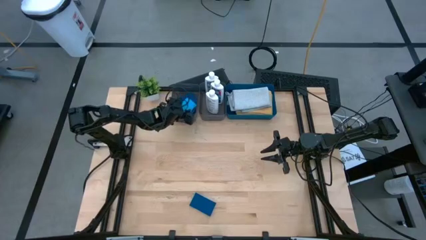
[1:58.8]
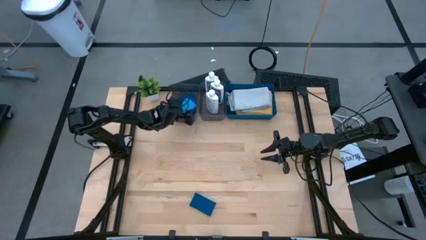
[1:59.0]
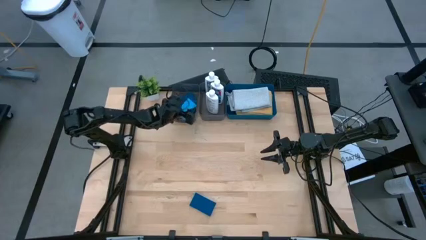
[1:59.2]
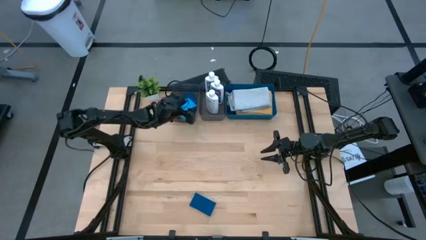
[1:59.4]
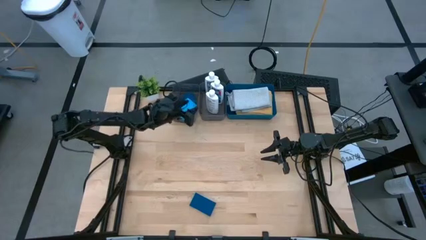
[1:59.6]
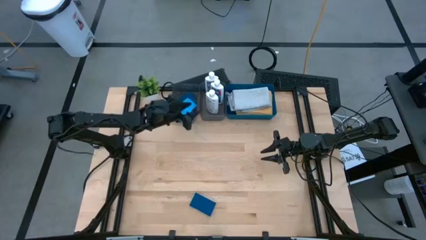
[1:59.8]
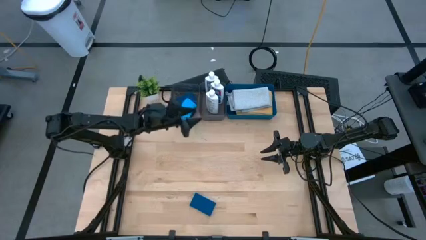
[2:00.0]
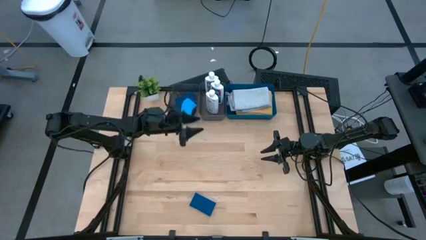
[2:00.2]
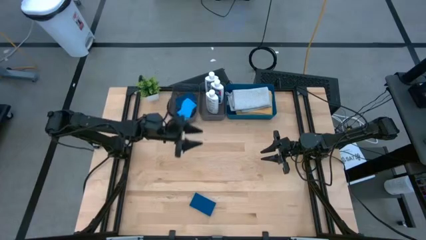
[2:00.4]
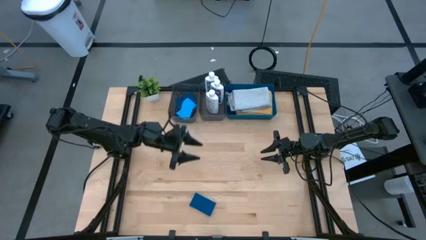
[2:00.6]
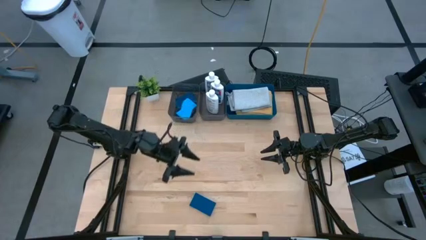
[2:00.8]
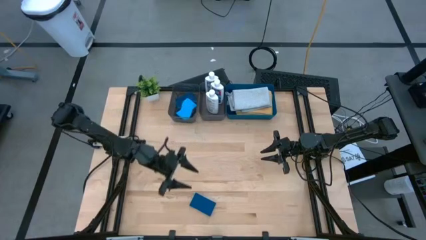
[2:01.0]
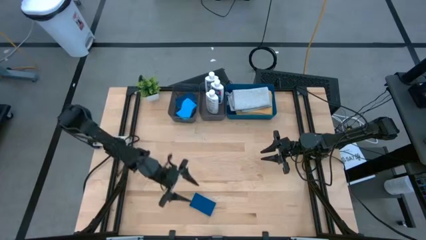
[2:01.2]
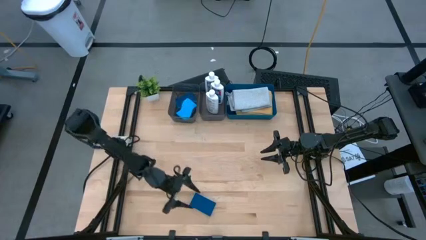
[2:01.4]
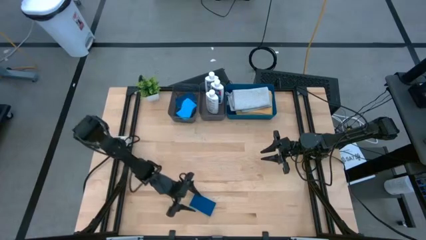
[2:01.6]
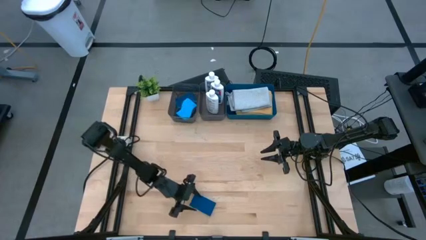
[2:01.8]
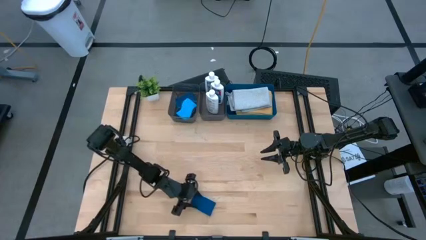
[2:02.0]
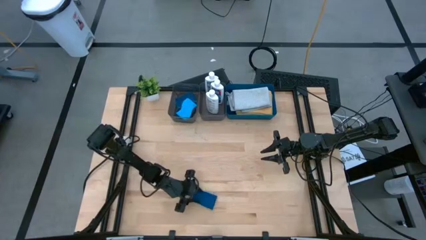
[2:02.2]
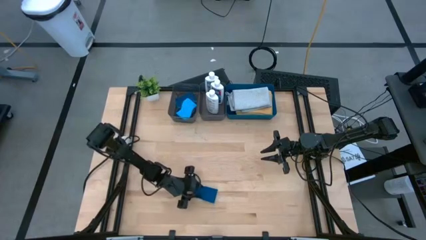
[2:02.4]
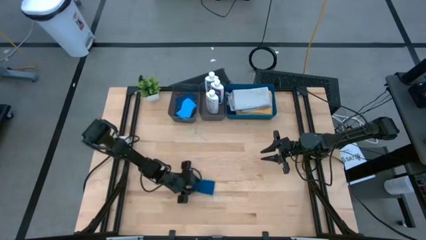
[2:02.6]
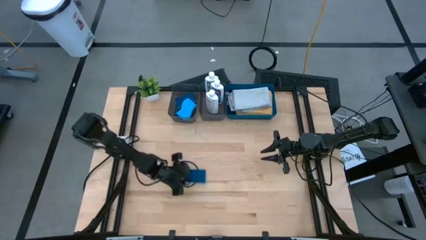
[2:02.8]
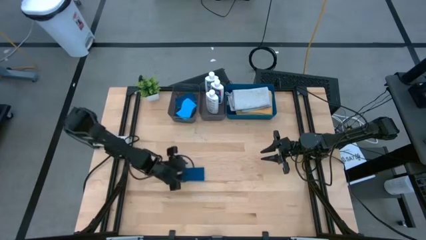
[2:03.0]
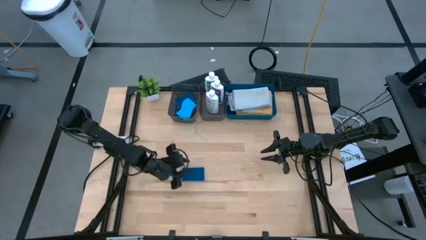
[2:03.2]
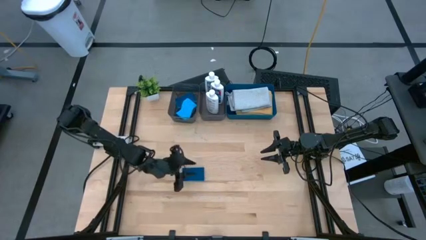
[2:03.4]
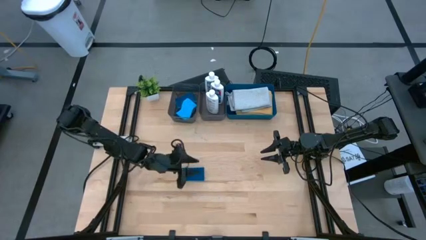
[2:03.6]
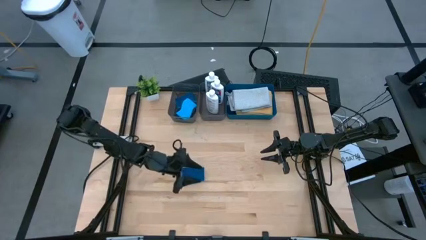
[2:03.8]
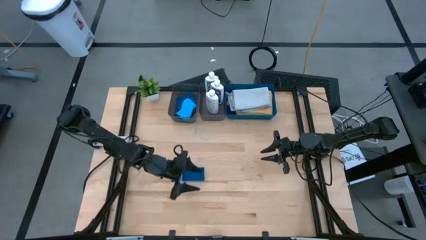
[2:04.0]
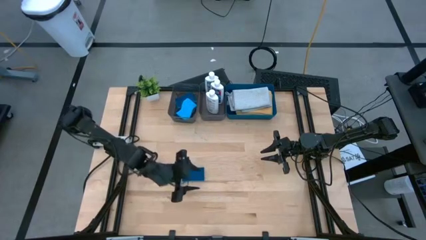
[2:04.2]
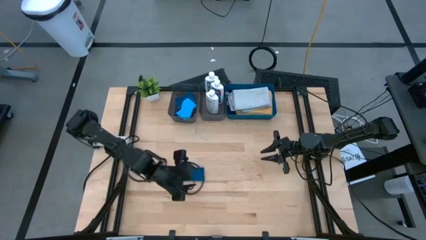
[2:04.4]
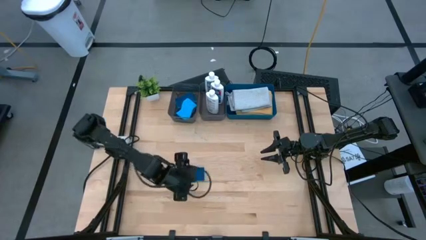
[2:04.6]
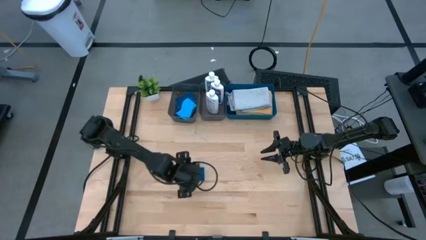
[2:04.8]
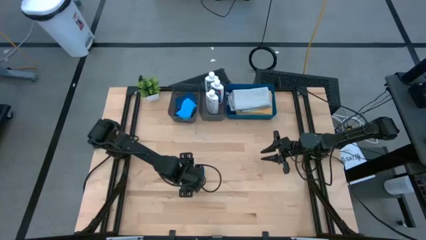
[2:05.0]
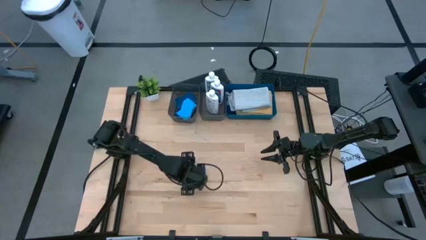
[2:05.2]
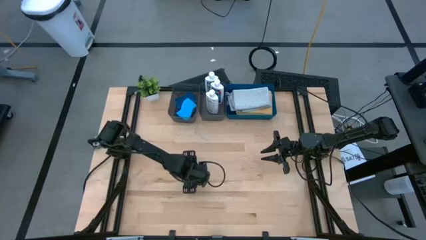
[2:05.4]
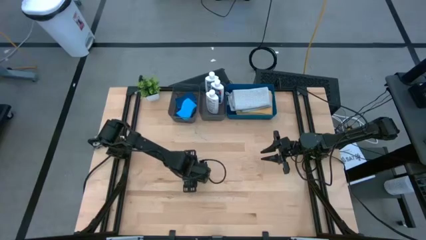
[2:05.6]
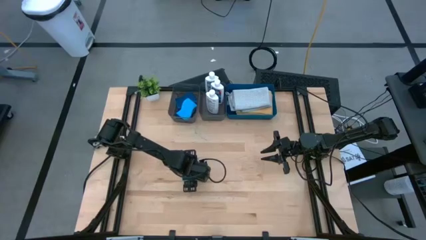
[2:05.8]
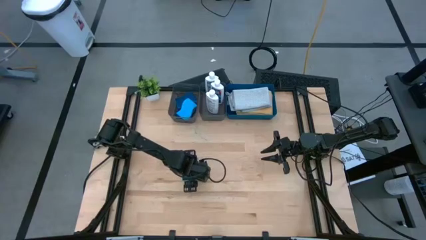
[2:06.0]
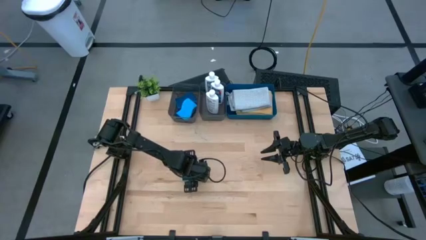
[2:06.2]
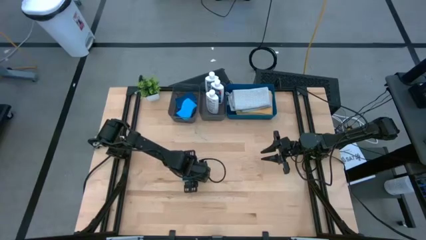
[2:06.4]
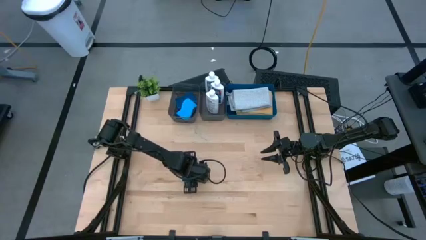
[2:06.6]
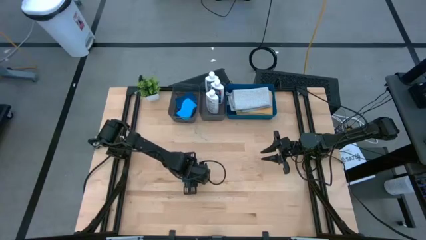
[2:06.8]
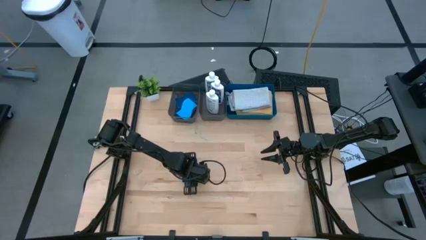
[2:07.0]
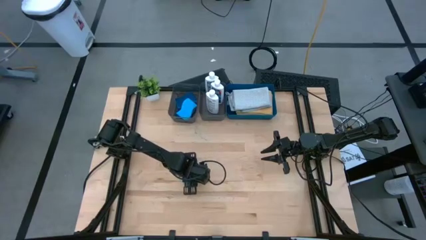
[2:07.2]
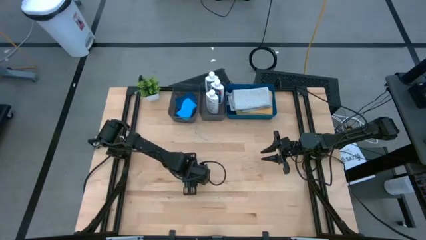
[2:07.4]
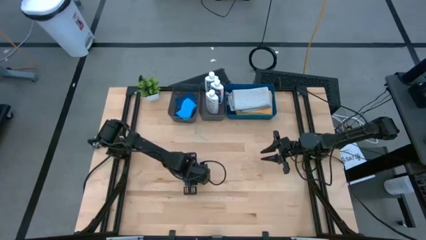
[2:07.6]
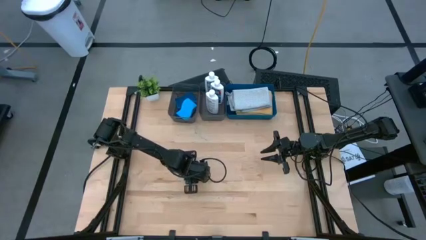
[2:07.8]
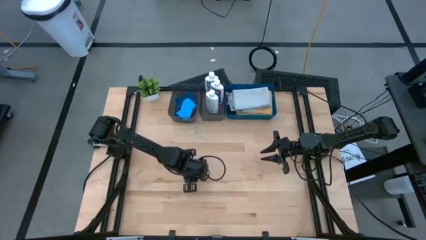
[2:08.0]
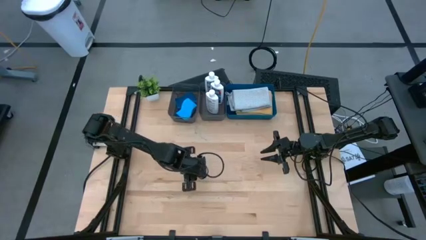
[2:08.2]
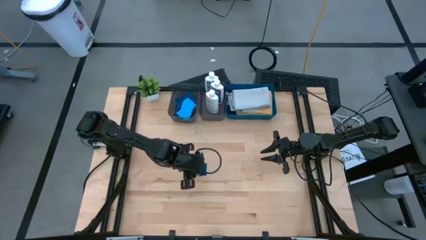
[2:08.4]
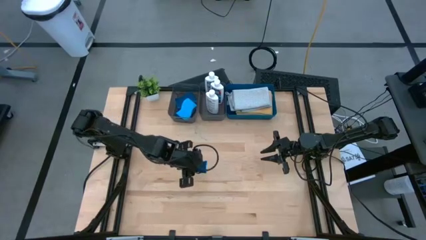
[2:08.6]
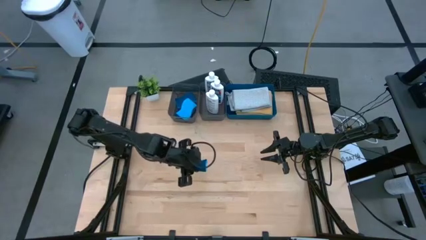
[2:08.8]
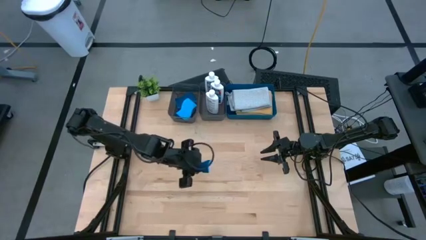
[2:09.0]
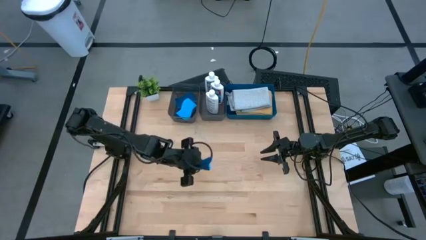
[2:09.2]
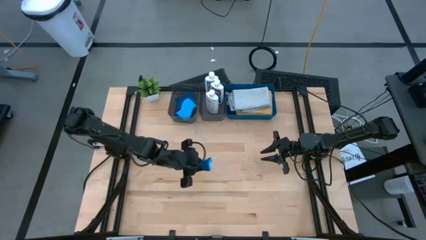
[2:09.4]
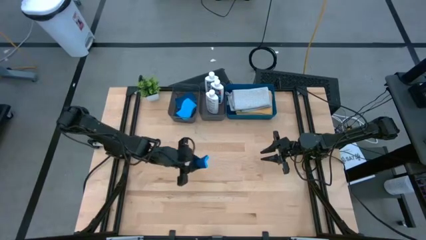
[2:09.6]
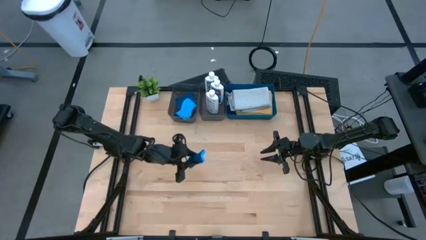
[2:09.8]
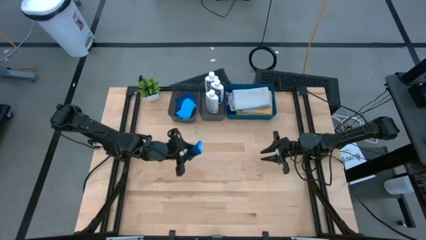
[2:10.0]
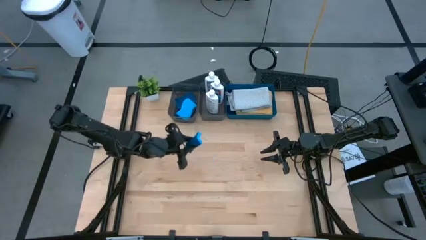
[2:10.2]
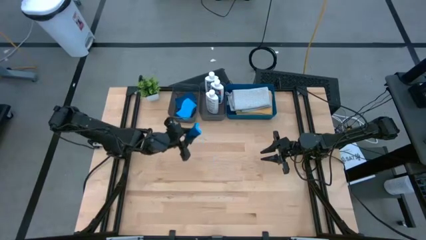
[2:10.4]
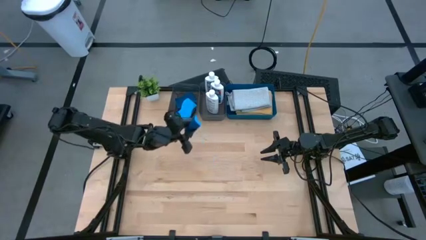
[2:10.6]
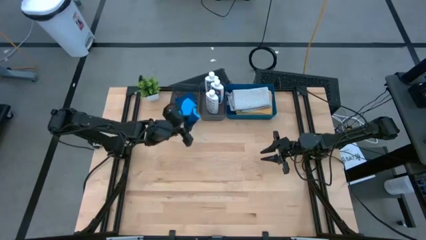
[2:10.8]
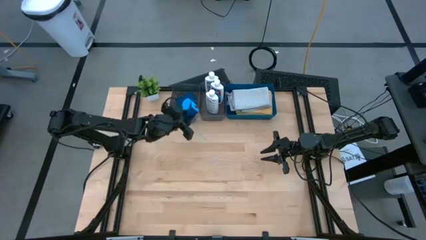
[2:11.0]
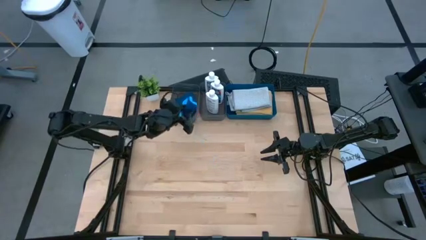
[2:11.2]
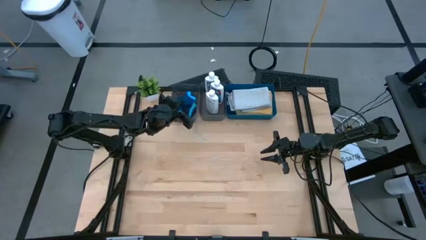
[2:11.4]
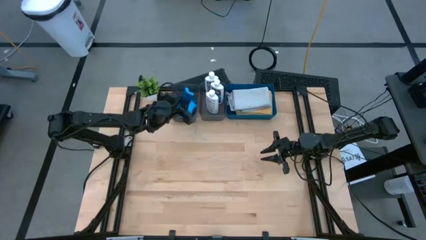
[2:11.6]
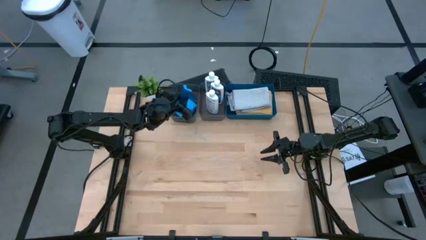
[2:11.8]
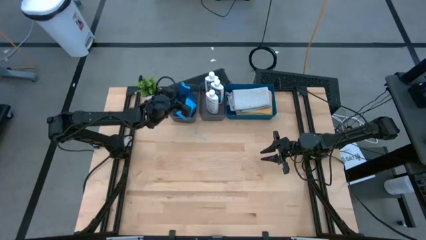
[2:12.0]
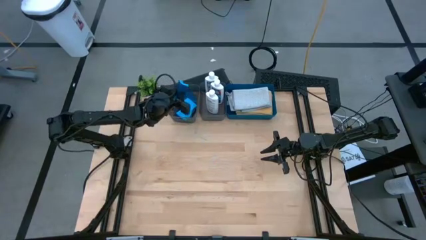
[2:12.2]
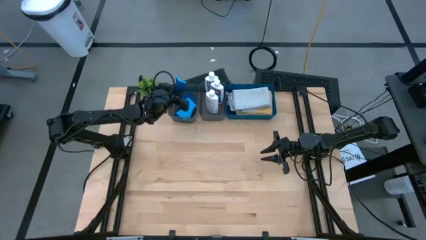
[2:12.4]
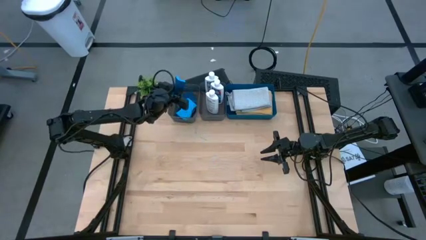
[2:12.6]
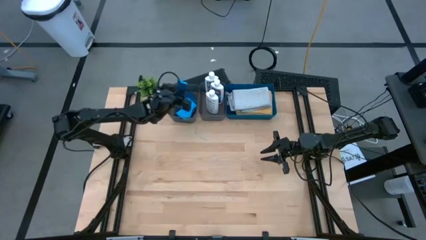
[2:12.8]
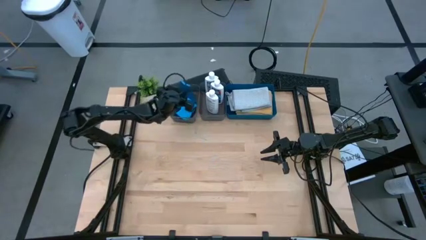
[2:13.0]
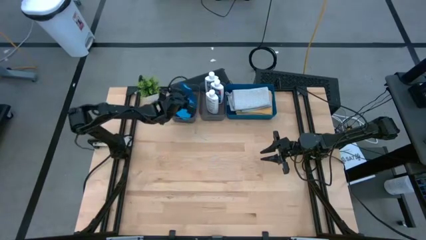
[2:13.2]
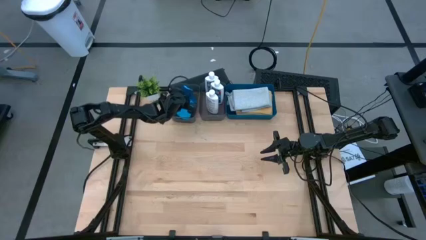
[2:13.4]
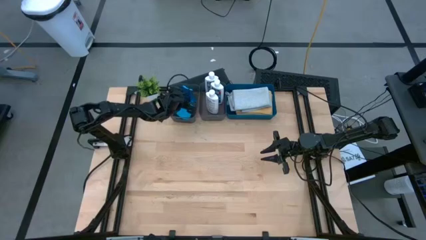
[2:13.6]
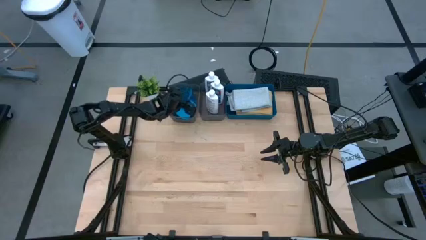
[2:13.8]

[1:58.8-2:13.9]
Task: Pick & Place Kitchen Items
Put the blue sponge into the left black bin
